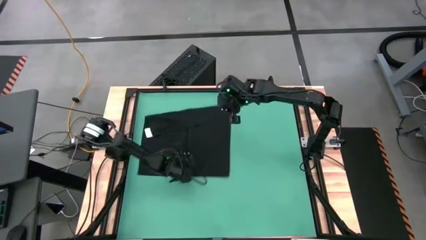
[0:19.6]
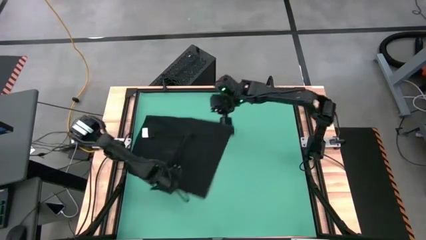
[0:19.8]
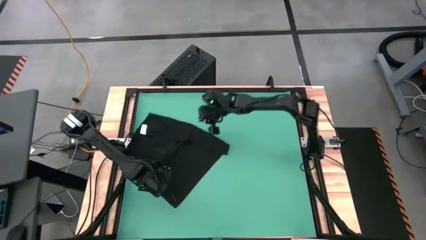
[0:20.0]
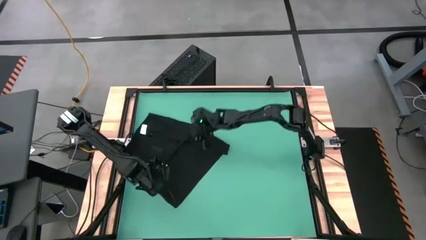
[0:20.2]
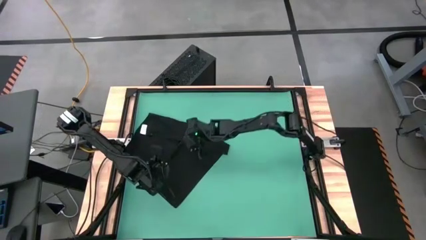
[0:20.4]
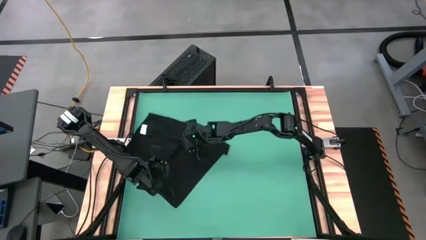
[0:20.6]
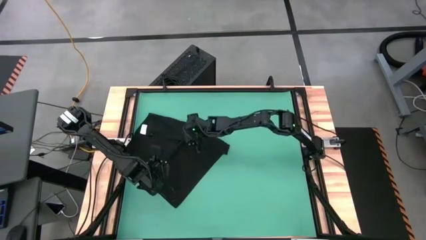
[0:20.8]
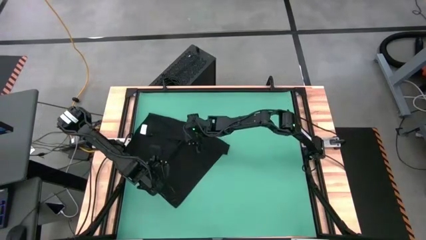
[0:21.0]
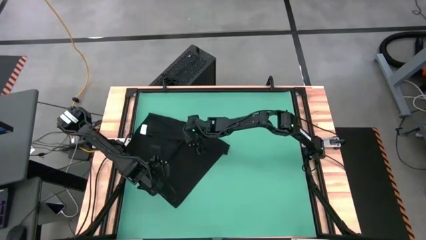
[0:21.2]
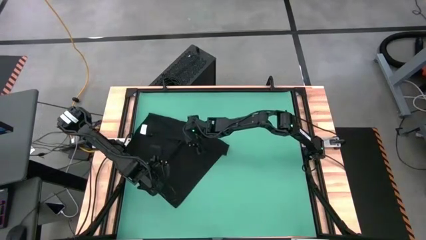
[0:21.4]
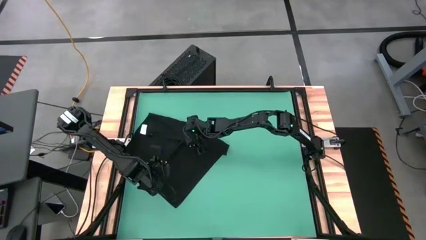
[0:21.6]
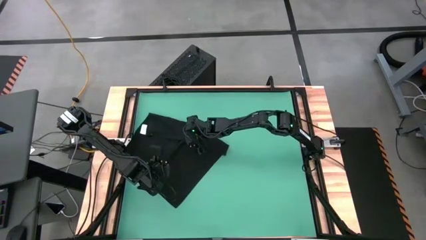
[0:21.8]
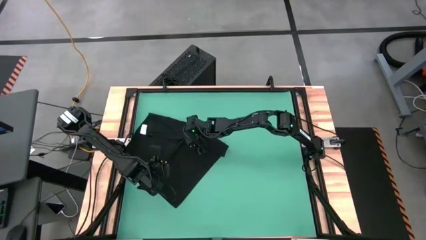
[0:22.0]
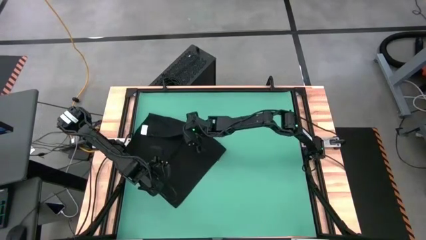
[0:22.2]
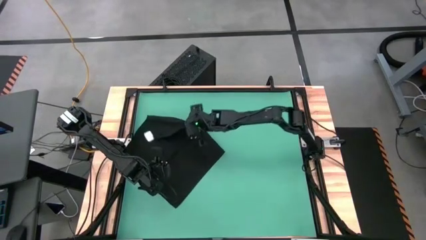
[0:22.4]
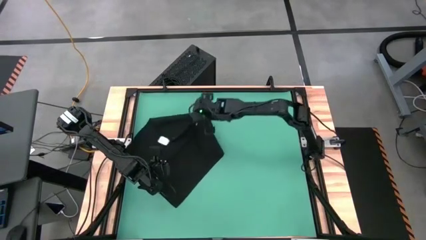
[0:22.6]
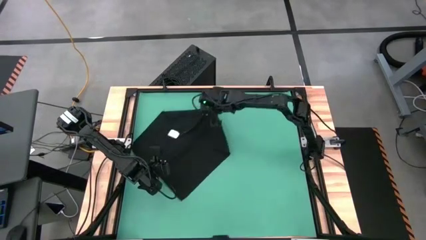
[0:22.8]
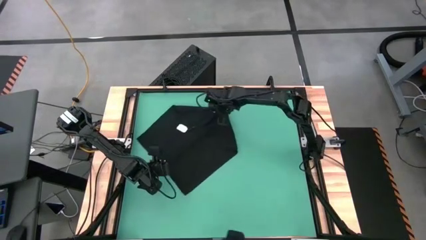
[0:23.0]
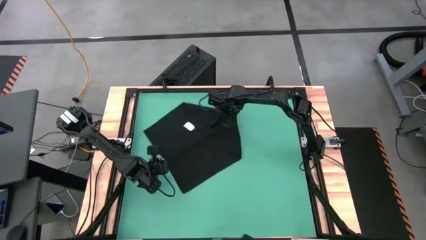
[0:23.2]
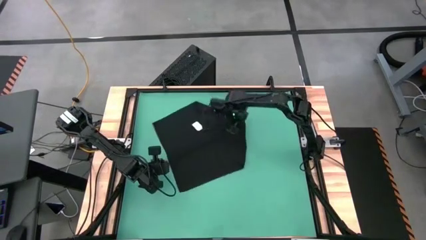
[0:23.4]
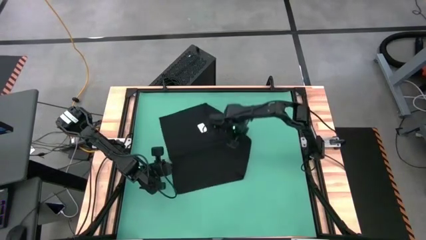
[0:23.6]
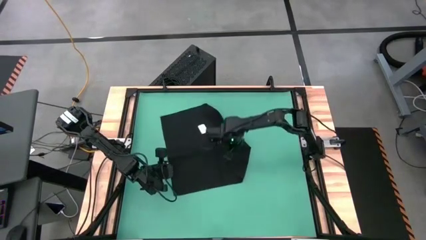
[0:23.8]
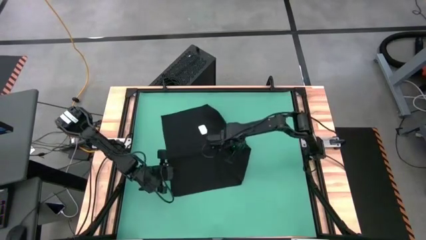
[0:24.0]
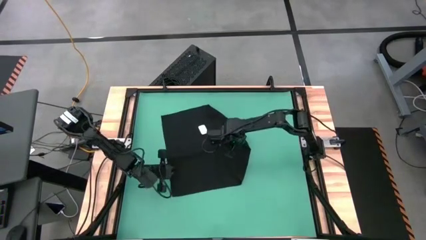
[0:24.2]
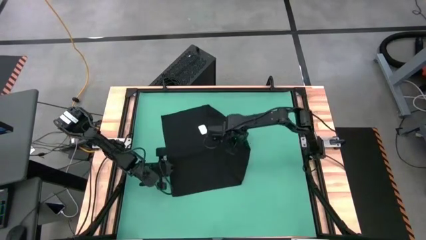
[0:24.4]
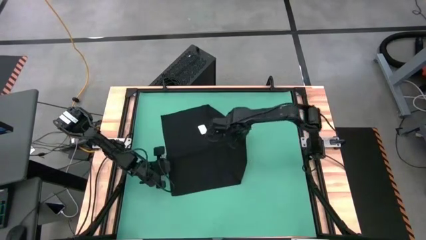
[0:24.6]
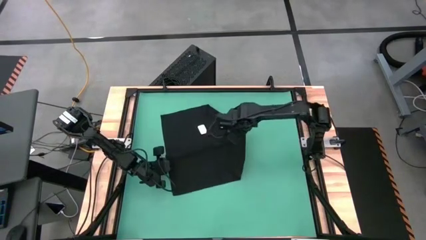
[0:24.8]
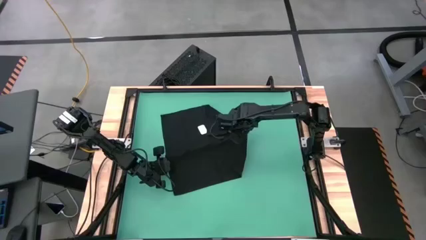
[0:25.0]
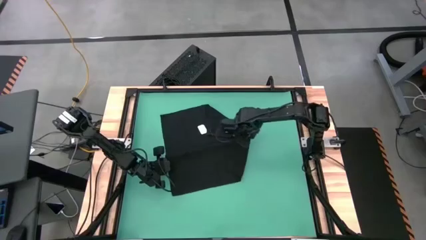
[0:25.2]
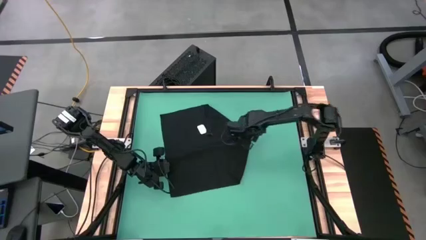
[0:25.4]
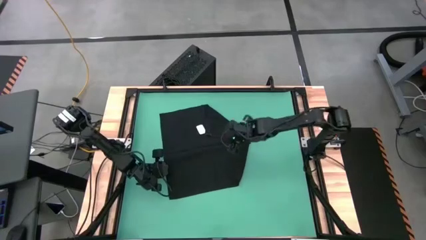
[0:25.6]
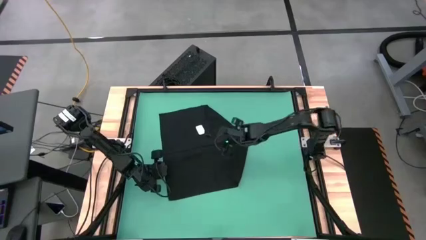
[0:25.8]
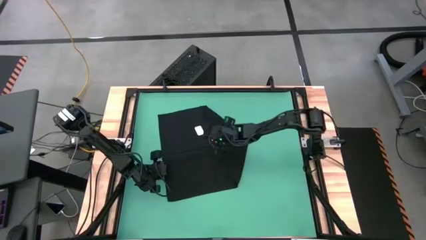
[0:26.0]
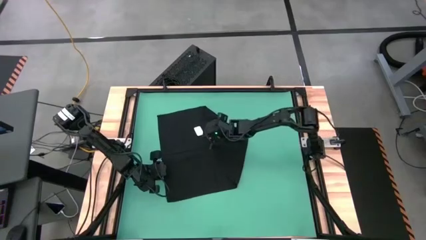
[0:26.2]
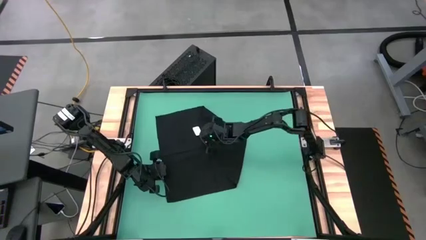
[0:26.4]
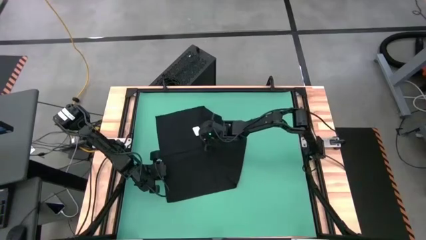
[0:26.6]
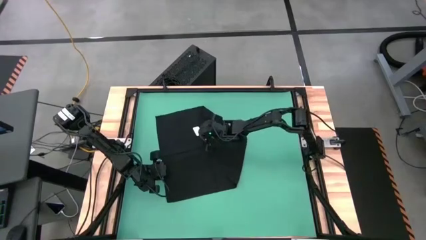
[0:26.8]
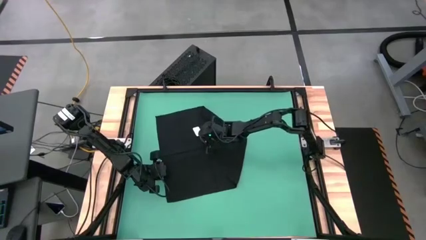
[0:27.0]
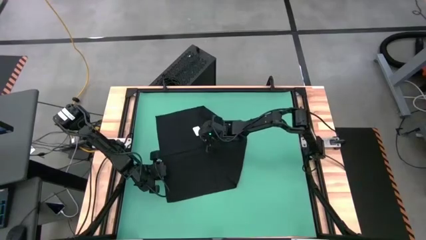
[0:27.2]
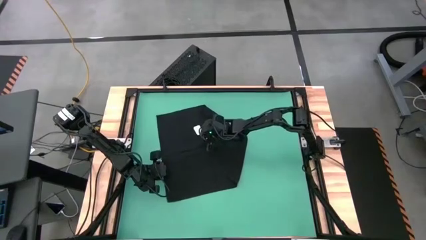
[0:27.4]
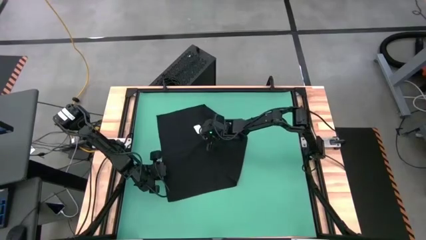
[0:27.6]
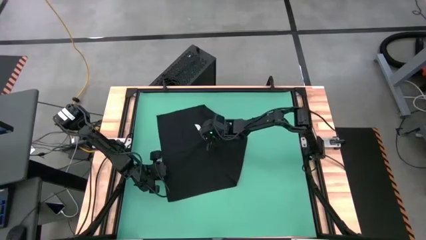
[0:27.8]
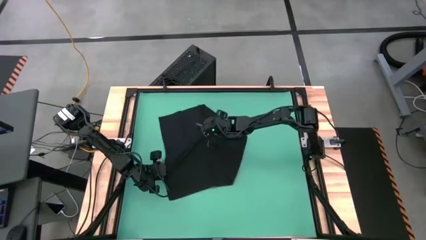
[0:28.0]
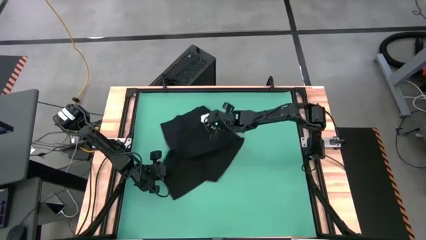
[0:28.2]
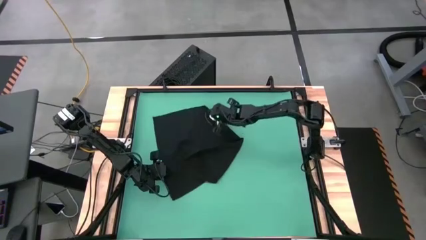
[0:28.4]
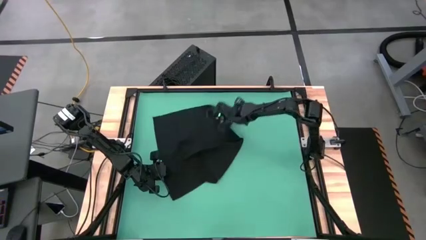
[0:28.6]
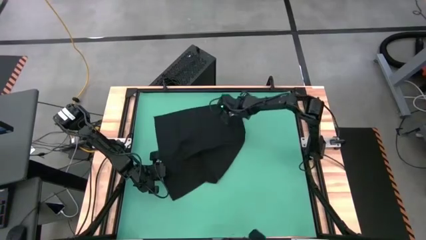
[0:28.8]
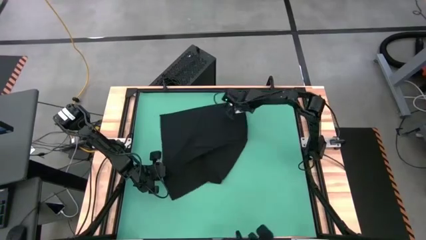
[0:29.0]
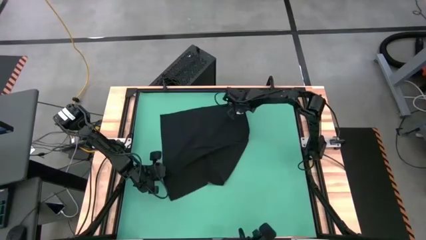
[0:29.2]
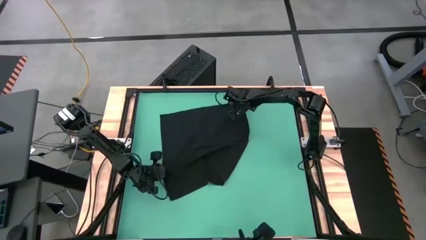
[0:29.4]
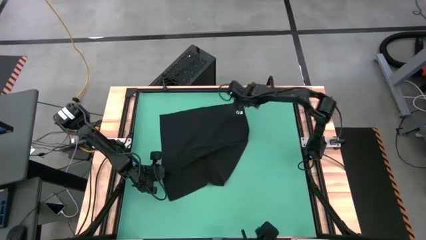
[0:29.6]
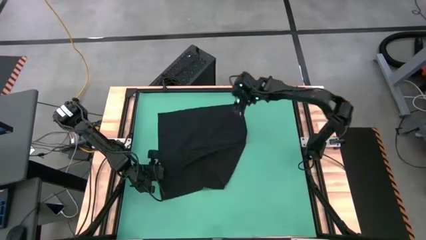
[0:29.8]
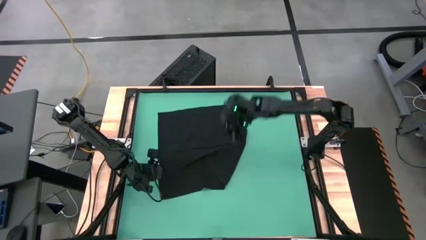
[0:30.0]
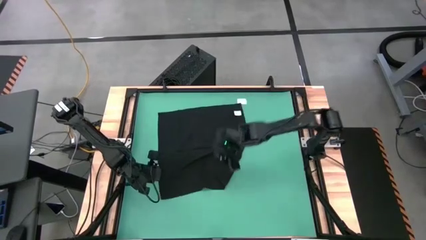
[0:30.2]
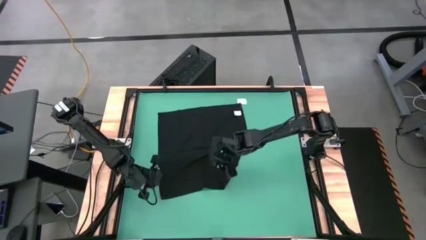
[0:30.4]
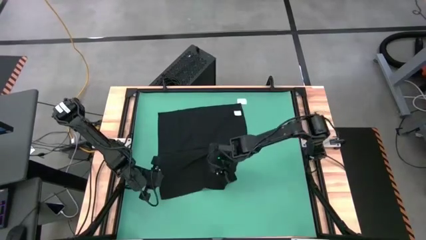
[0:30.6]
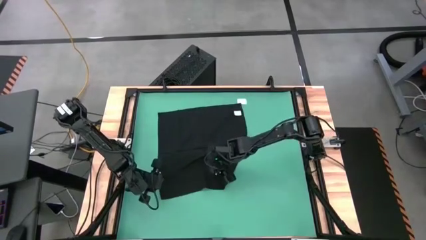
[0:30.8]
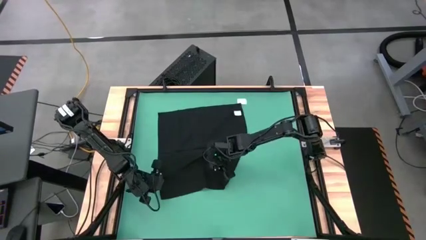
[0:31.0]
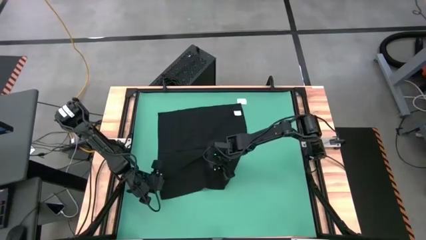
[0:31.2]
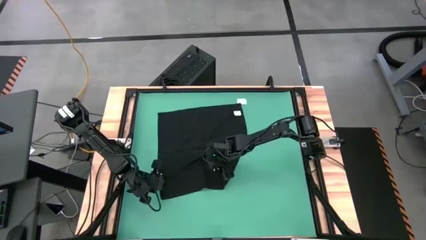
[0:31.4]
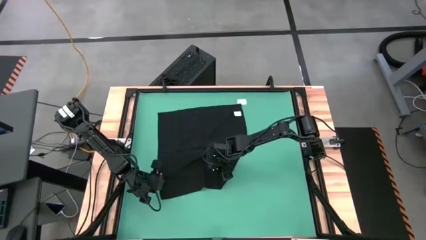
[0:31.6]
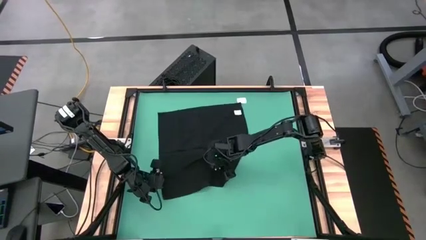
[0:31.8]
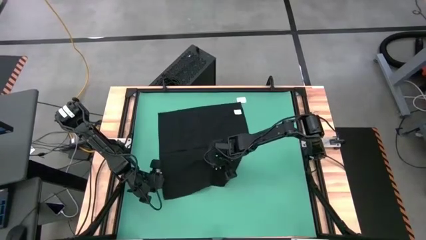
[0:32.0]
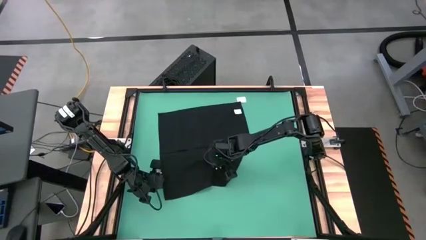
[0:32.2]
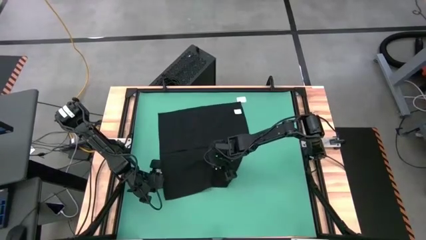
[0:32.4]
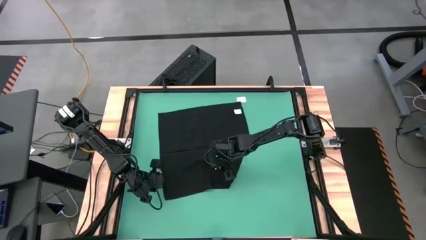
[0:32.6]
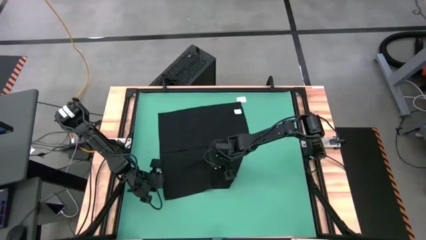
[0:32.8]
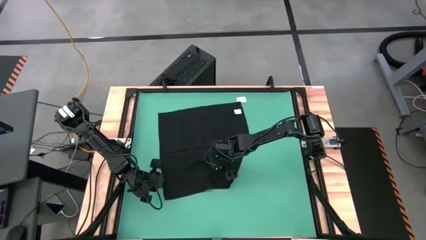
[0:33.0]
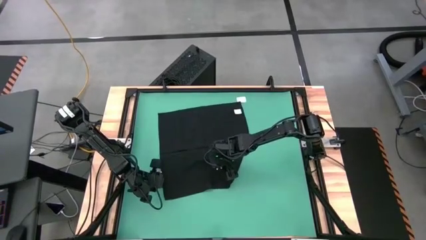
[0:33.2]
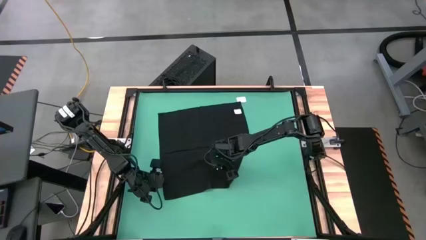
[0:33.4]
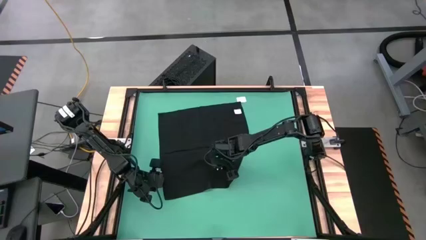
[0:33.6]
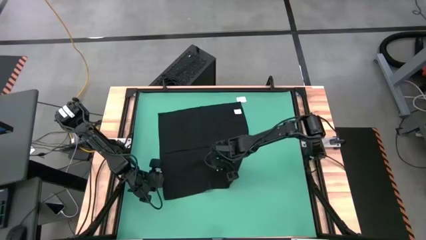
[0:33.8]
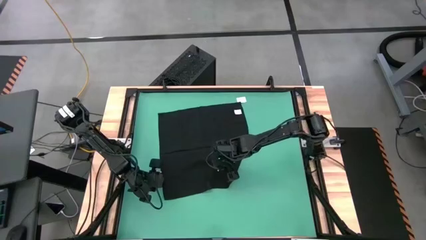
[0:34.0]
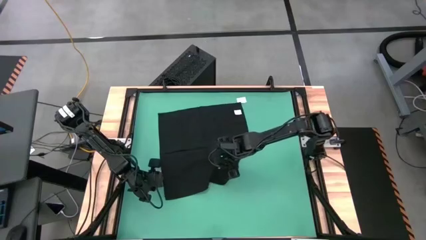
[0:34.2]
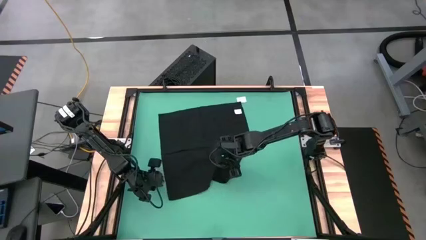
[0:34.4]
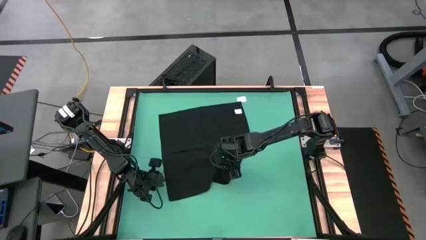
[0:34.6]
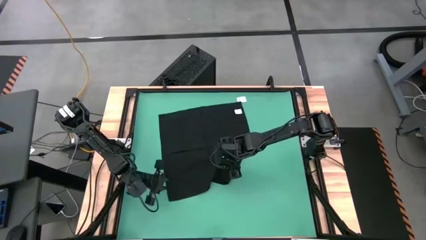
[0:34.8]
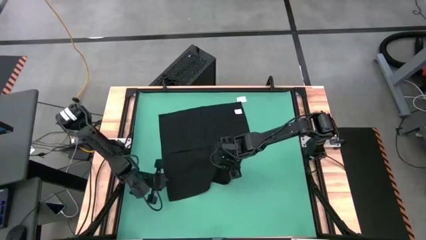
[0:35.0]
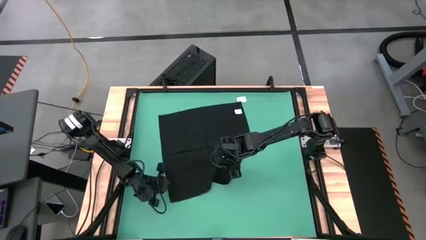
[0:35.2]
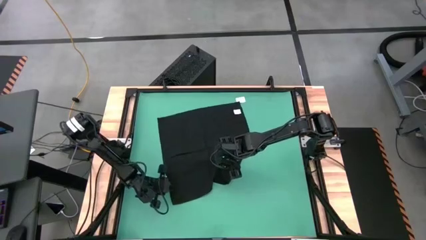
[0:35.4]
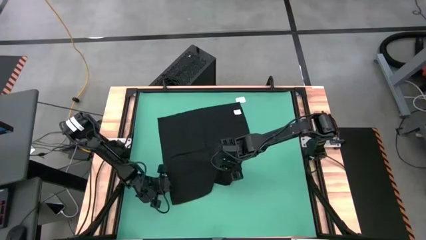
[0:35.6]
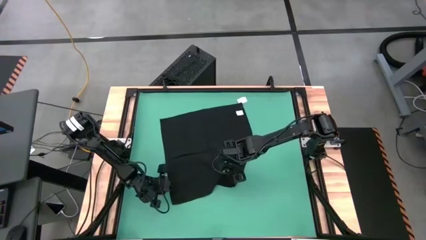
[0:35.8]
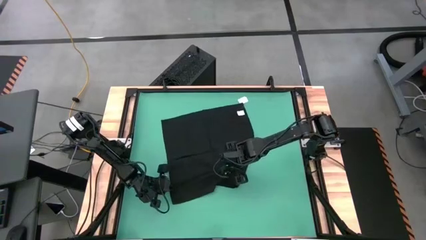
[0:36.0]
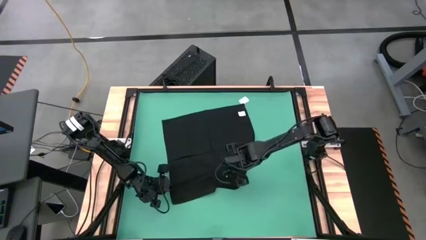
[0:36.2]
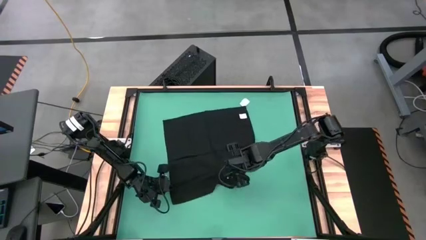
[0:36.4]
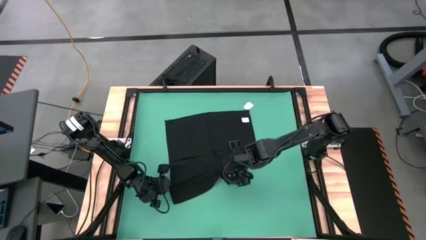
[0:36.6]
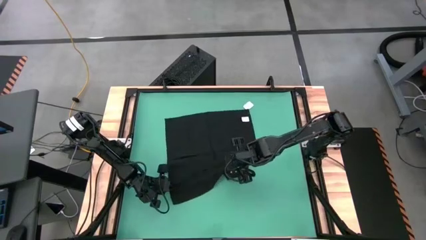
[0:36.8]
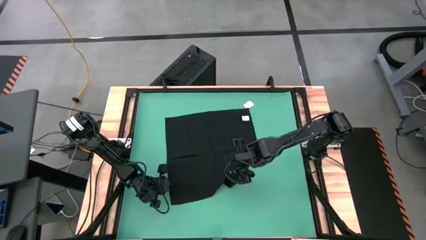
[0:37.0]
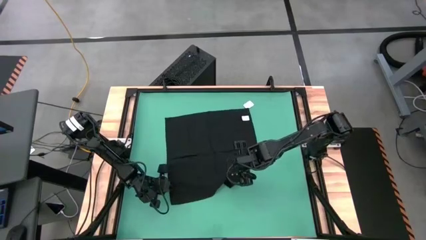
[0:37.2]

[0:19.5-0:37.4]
Task: Roll towel
Roll the black towel
